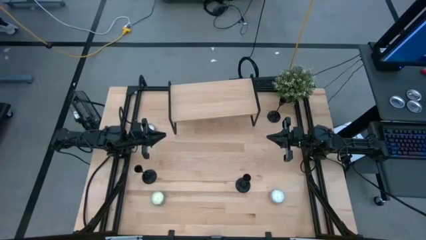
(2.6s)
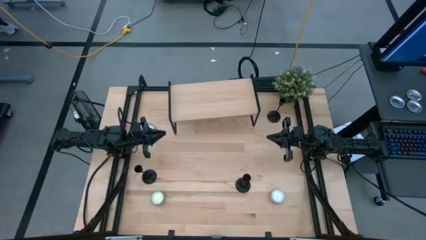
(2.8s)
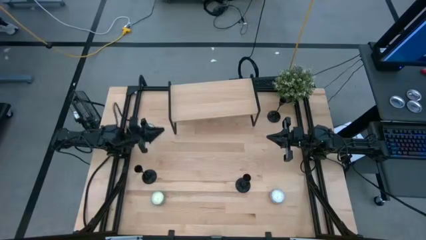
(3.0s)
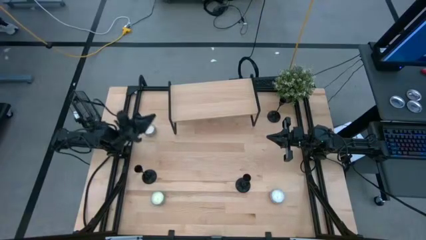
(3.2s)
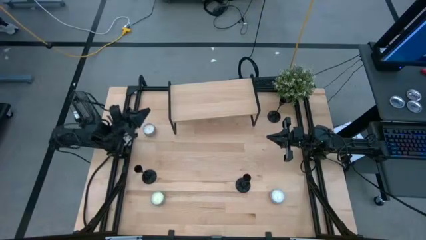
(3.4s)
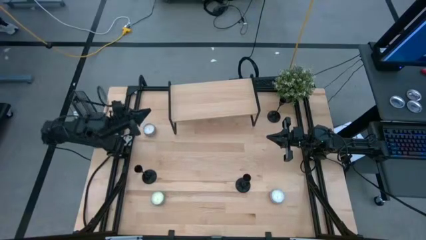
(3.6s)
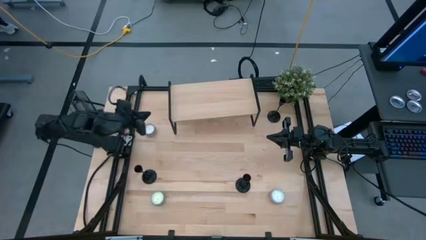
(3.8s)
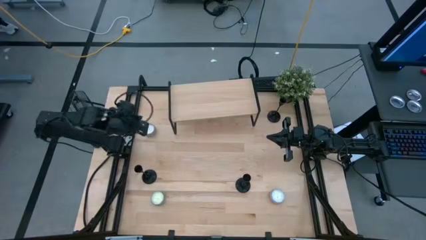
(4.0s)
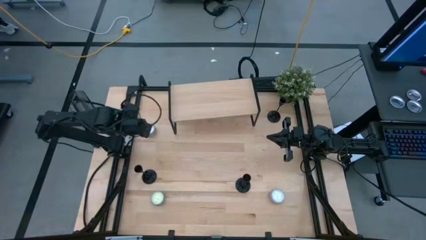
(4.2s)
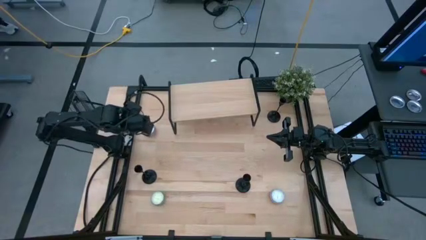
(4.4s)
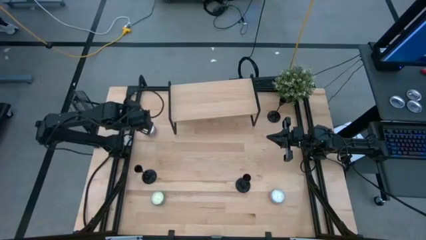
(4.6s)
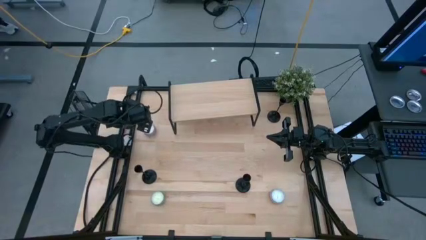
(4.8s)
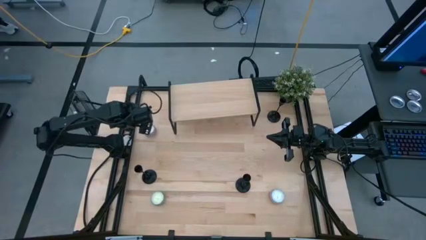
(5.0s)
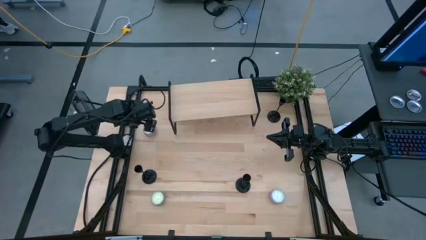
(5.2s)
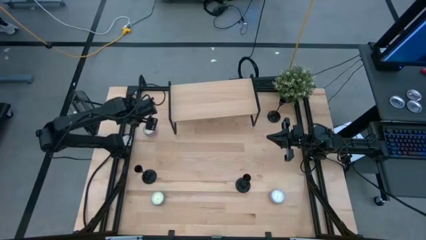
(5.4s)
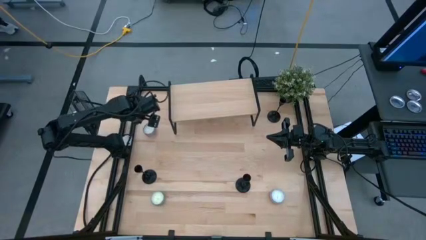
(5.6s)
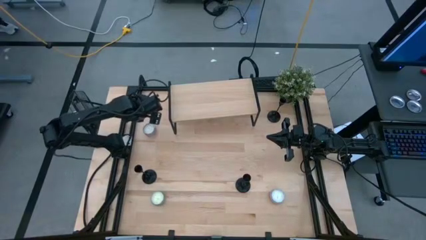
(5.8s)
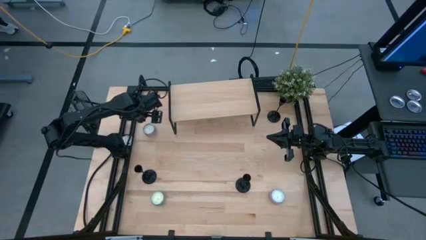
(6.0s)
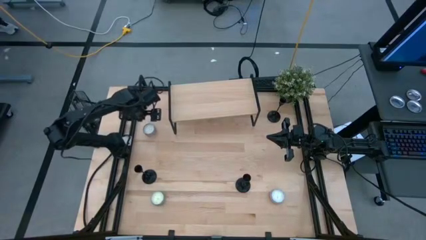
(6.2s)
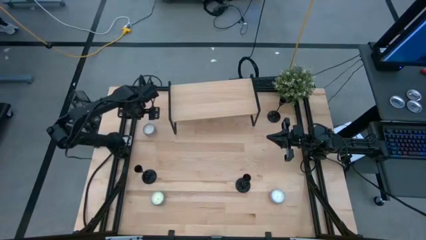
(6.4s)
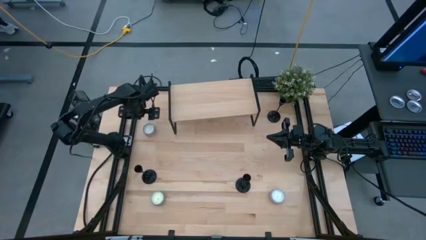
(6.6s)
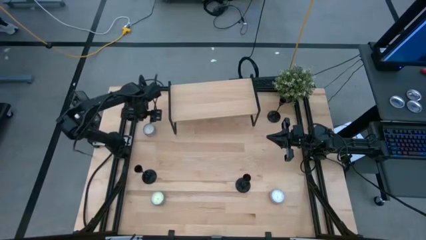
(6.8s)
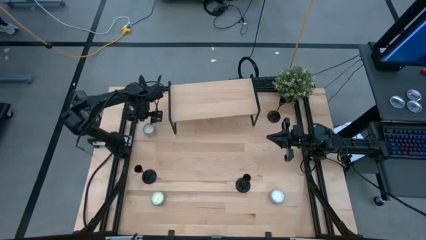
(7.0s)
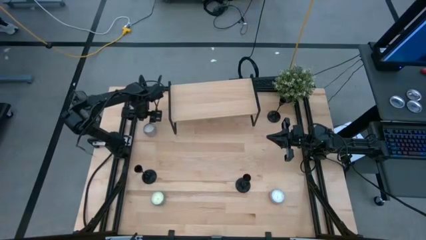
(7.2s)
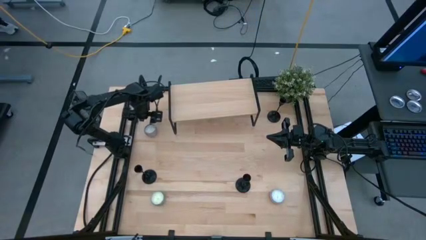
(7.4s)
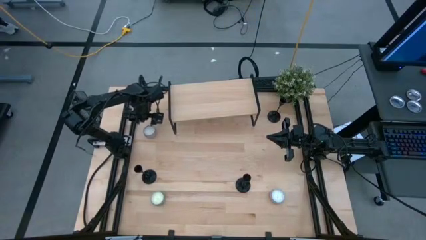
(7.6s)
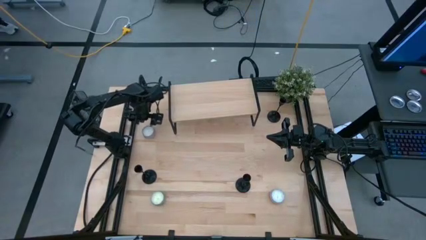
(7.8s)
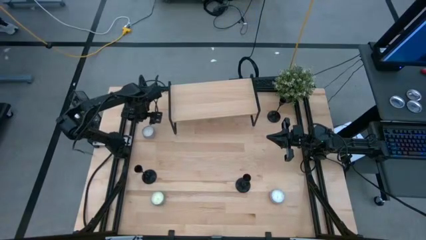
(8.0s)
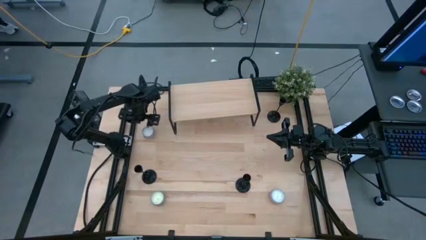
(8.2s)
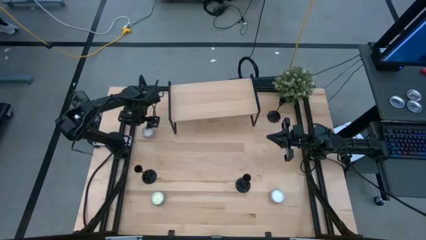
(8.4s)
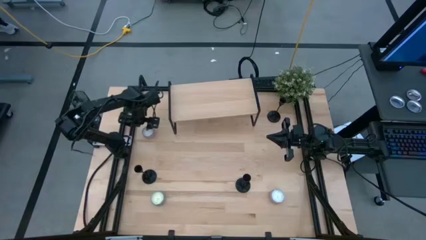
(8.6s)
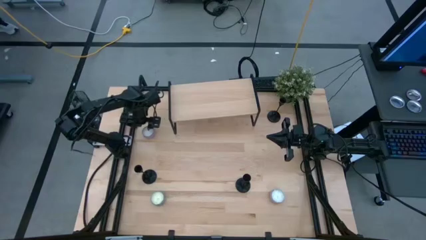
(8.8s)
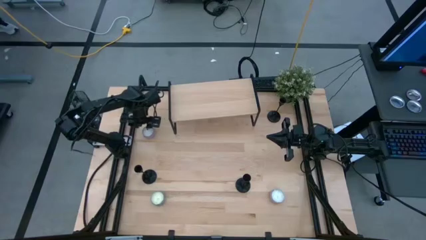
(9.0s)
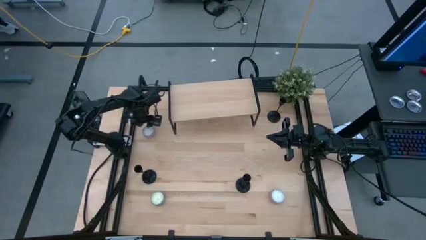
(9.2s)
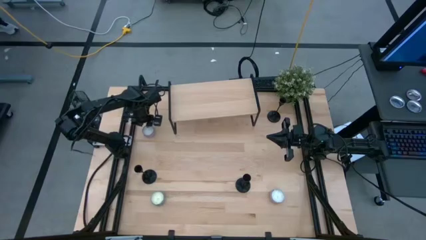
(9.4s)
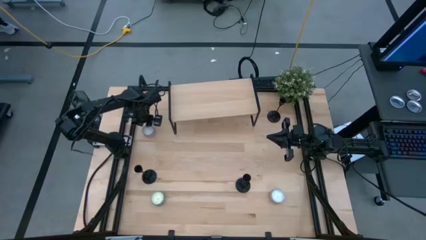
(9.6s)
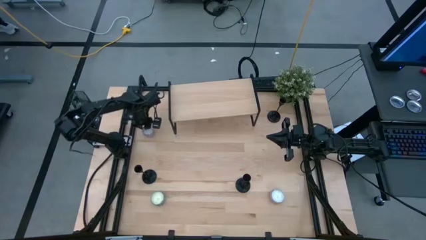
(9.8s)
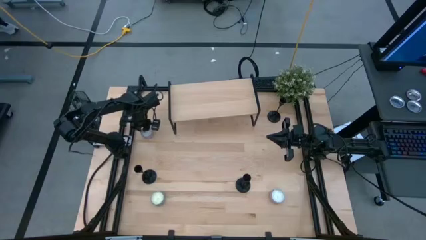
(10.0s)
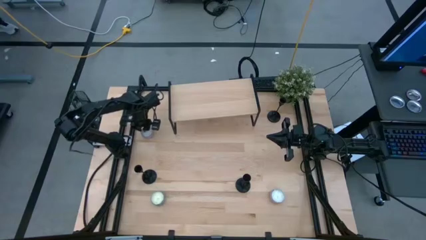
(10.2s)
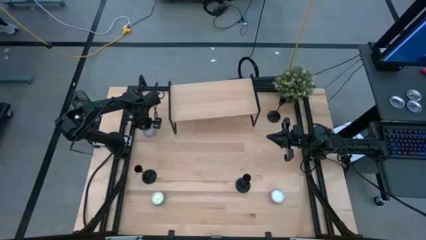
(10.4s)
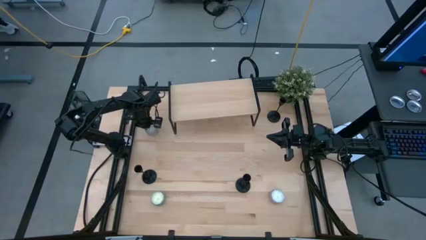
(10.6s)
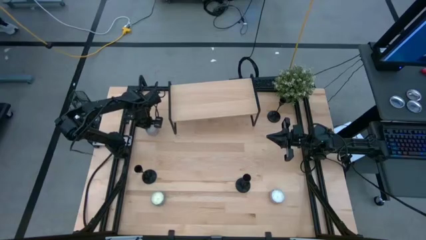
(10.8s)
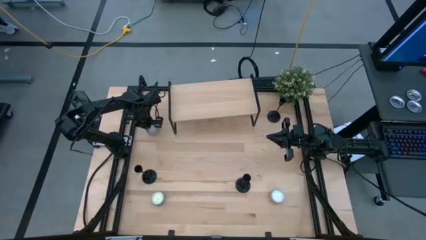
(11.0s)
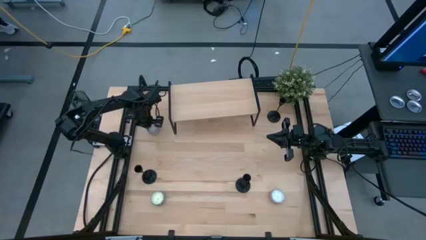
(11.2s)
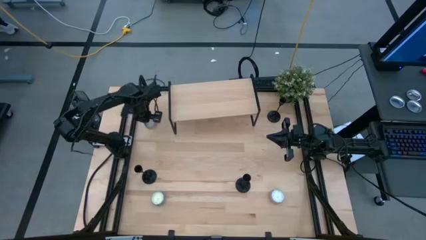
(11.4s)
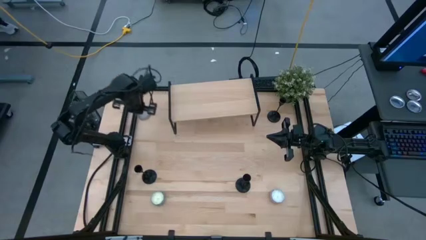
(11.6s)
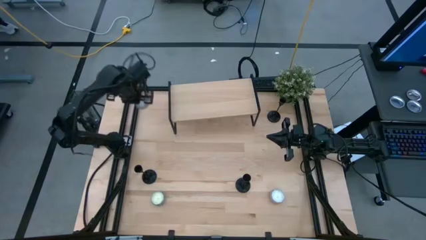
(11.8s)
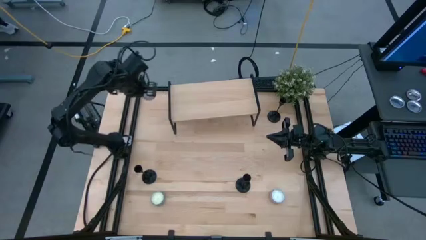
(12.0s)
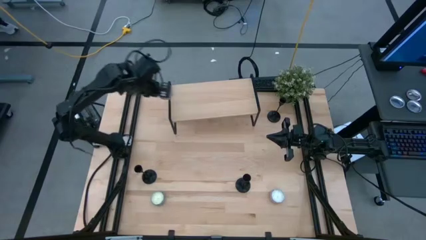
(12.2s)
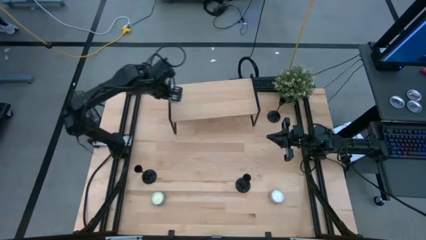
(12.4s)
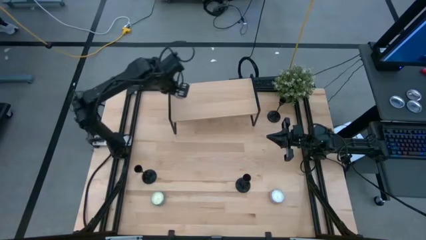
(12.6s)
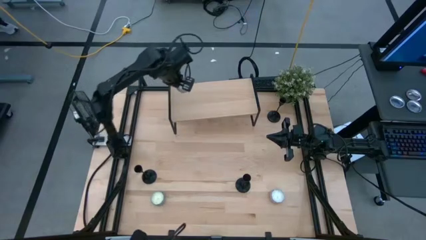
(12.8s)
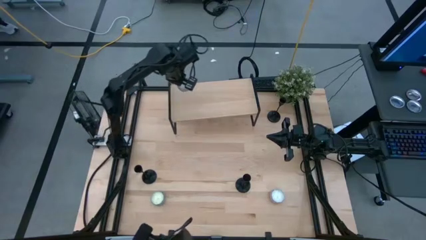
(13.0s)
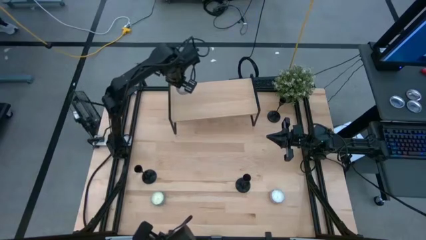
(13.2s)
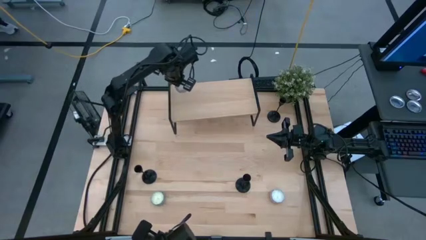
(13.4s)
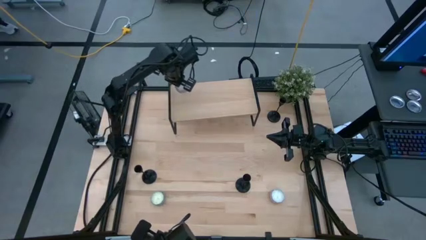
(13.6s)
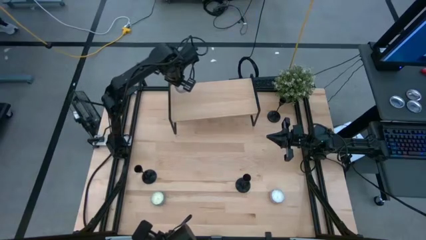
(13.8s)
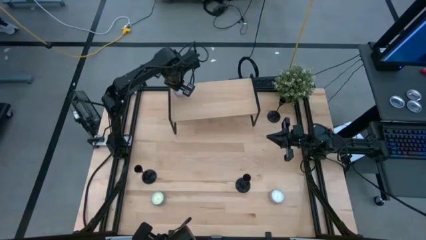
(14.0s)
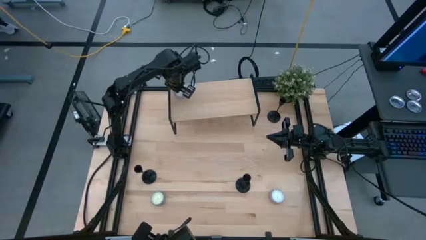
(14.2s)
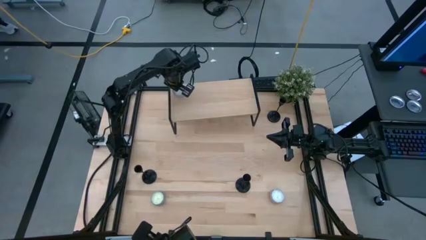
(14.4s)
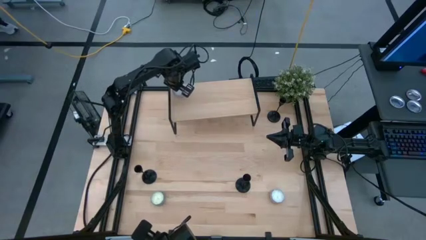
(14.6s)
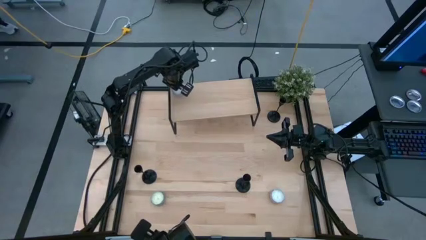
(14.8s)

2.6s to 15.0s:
Task: Pick & Place candle stick holders
Put the purple scented candle on the shelf
